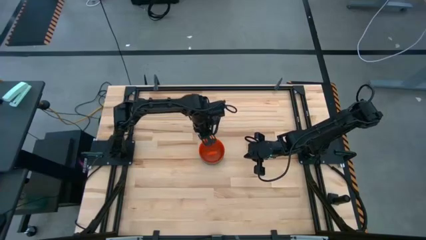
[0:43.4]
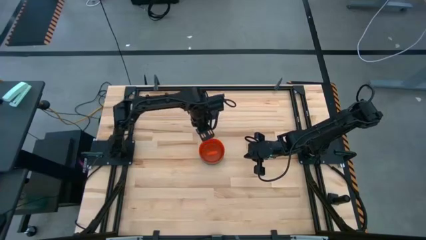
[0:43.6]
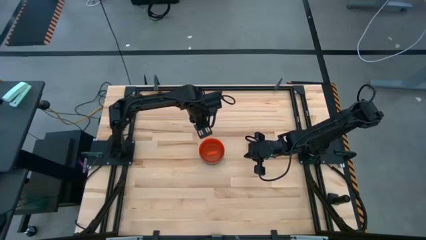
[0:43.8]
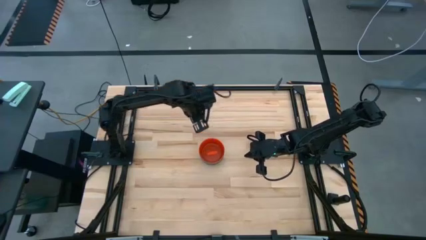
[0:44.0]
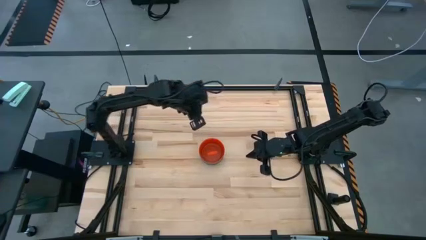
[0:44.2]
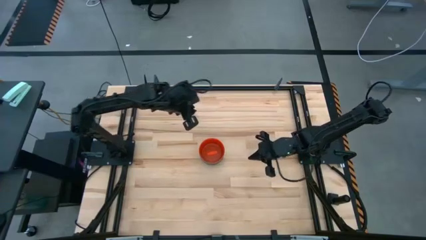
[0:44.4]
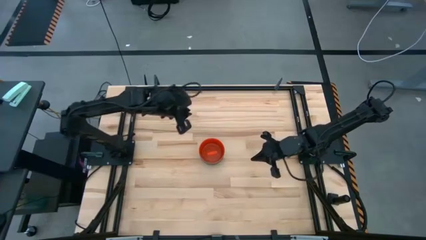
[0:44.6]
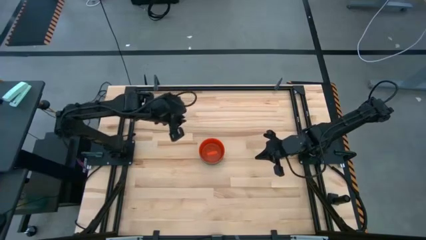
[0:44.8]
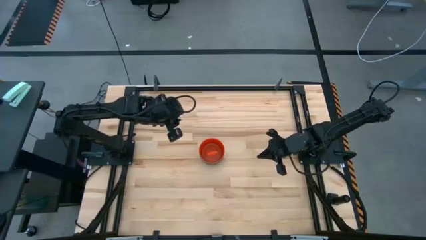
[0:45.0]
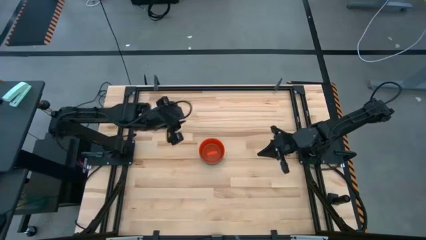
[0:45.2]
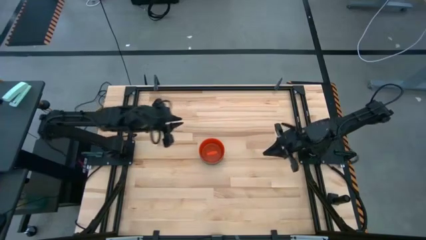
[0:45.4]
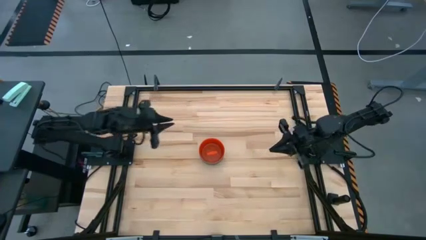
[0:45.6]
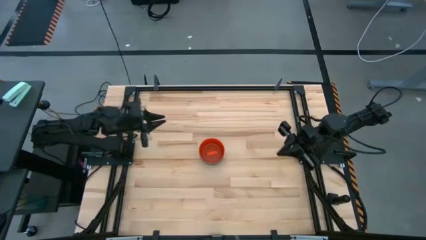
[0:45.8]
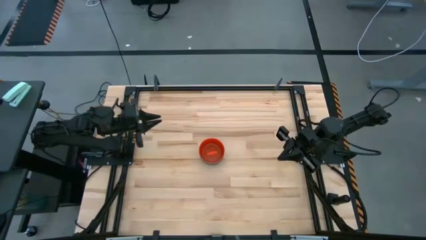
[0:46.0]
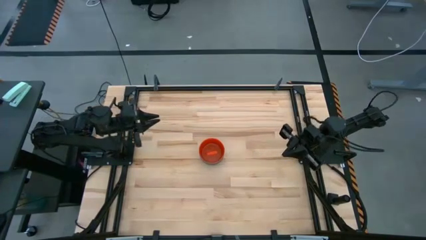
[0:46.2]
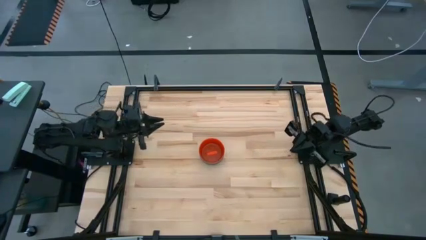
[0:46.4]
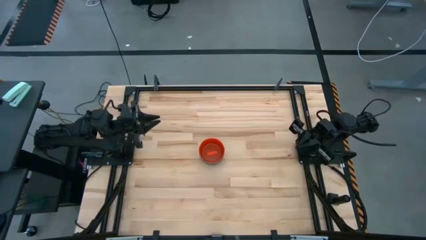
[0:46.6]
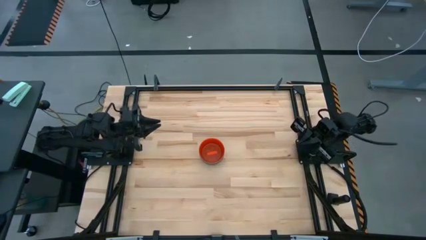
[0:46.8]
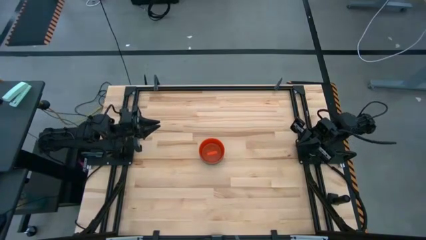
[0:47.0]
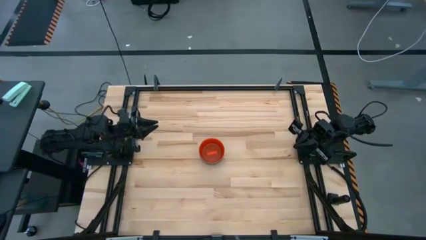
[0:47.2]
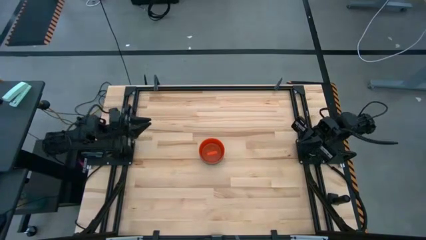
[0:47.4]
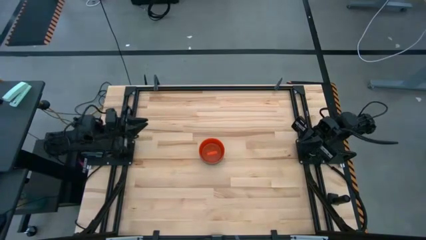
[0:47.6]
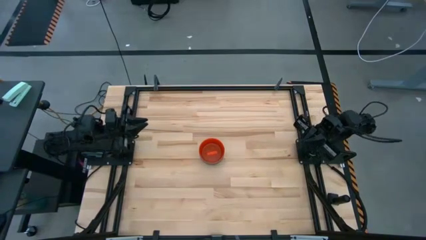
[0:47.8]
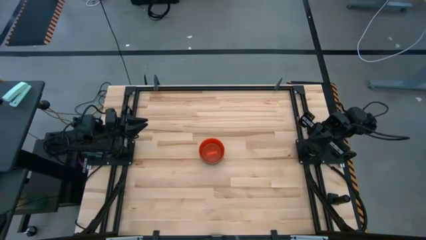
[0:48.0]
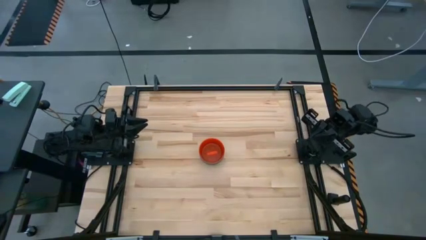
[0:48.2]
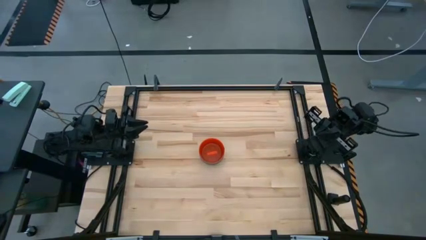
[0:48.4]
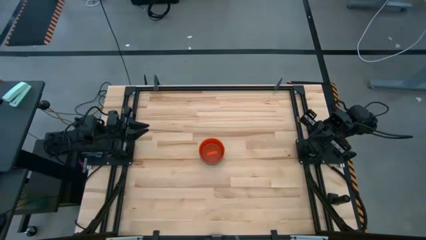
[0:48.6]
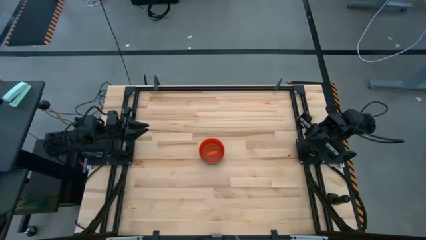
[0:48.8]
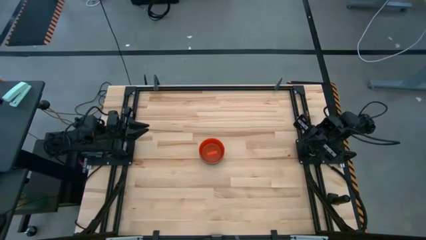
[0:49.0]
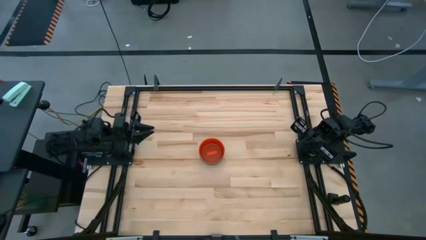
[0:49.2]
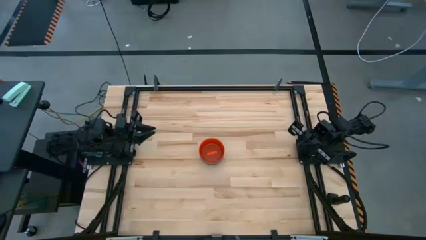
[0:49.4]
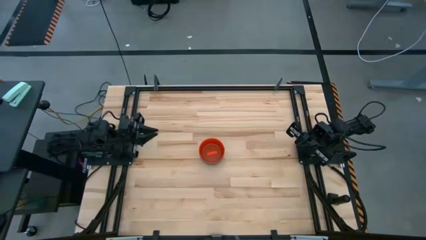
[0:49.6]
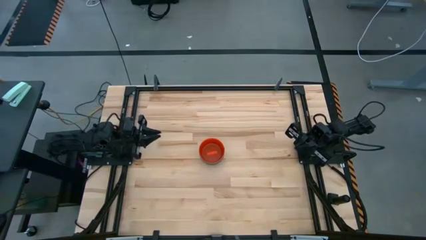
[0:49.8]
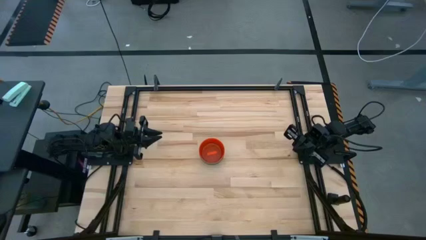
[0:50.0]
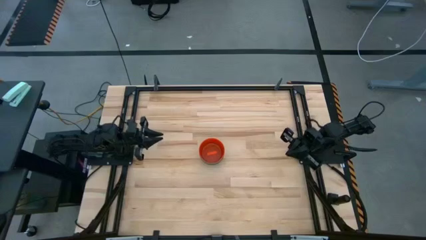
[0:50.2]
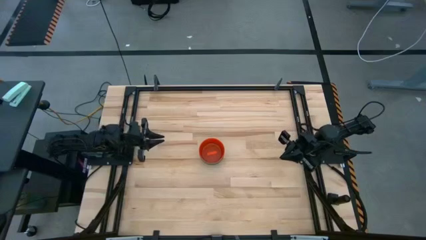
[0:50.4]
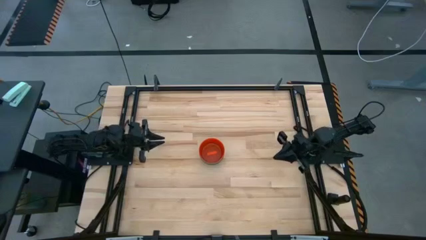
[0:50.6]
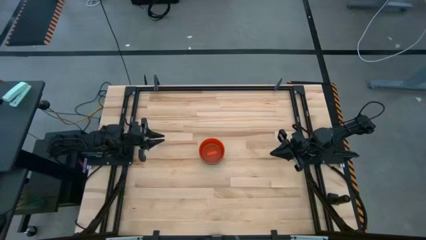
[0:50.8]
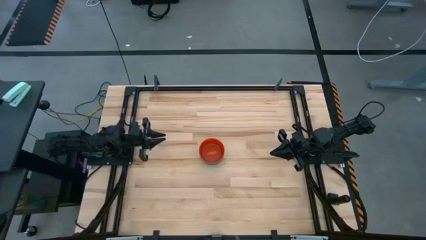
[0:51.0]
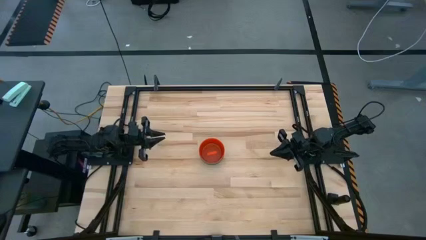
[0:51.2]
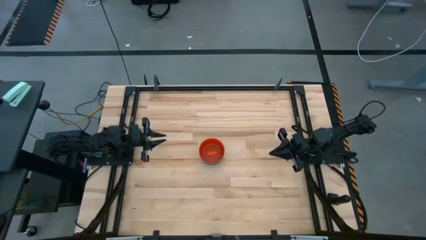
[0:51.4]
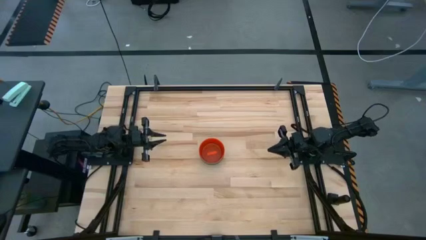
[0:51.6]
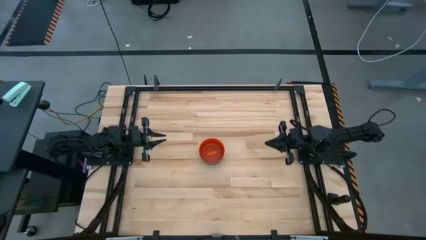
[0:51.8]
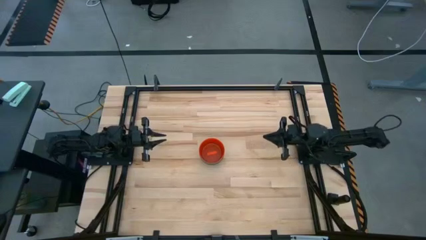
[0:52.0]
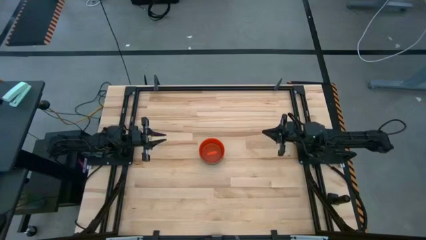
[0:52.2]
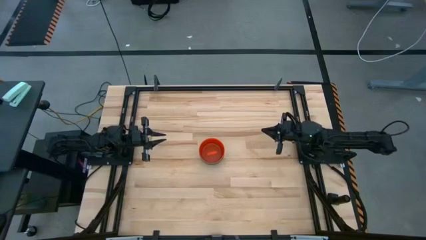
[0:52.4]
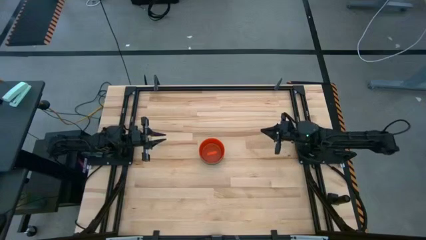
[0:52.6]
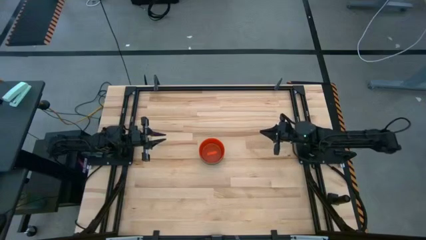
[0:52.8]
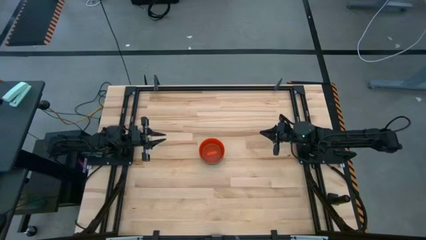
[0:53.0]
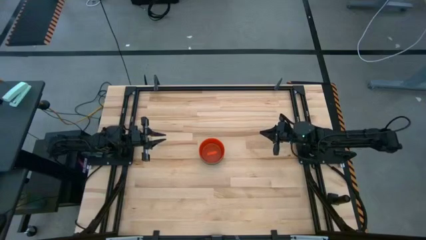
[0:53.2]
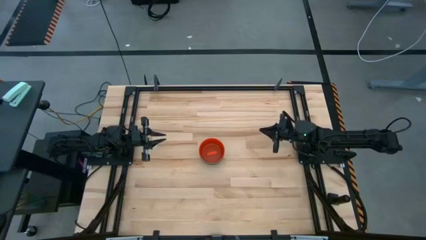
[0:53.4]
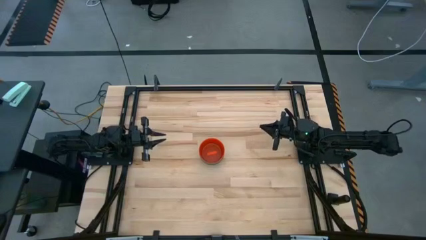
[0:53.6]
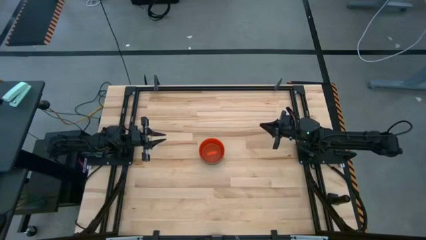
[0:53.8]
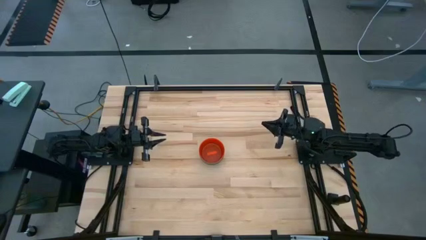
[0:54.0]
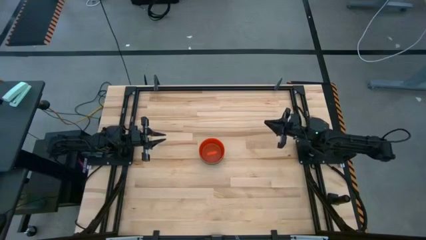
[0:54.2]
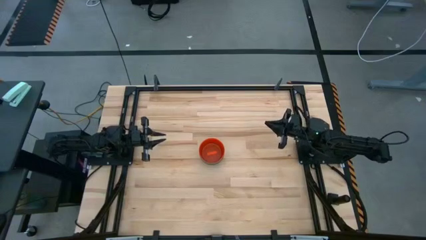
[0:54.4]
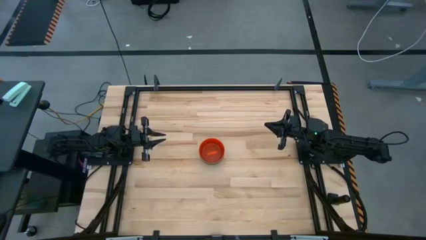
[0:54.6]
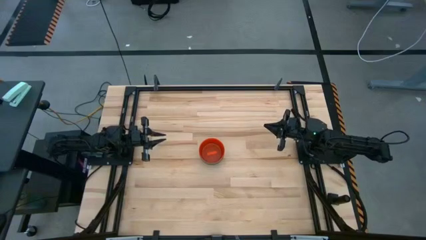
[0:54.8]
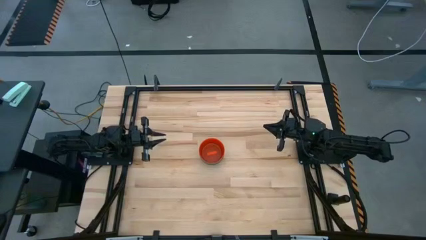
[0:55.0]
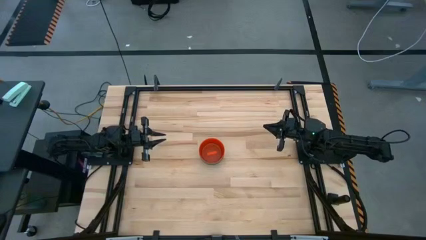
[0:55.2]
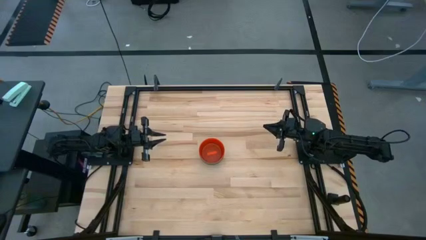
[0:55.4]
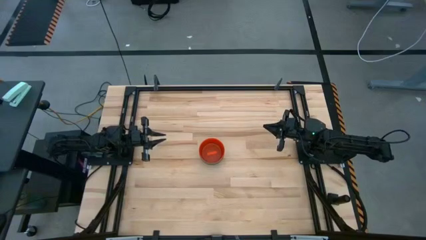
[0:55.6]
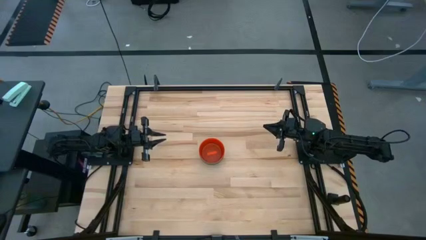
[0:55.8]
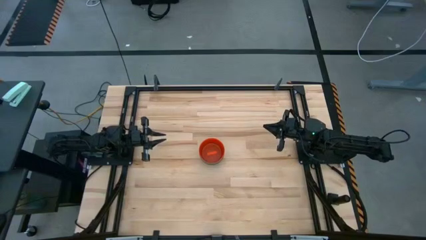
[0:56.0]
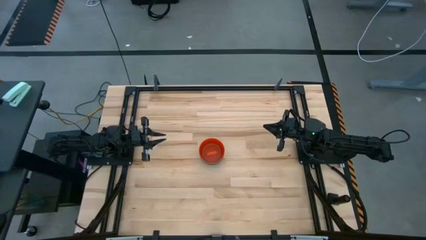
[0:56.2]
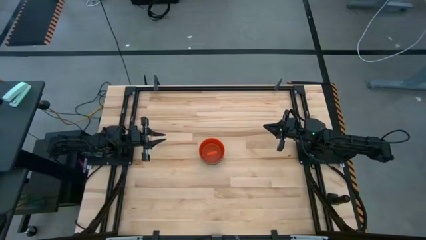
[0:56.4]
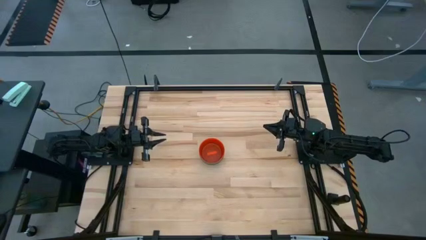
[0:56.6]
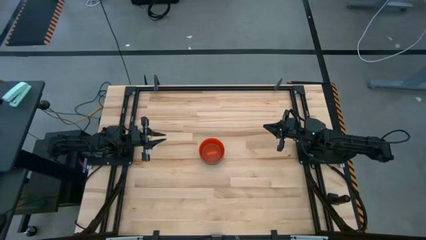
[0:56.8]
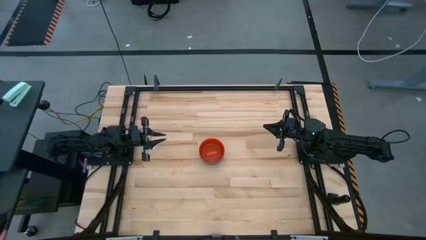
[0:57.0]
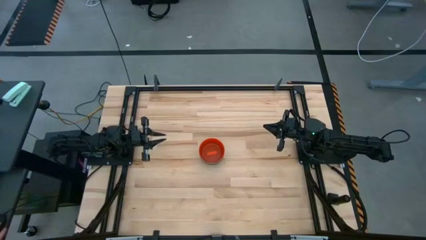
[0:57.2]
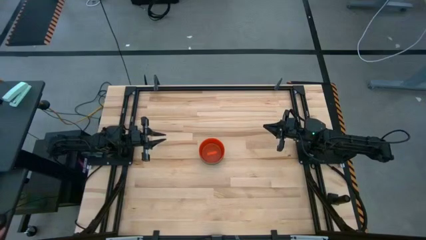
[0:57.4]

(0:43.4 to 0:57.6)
Task: Nest bowls inside each other
Return to Home Position

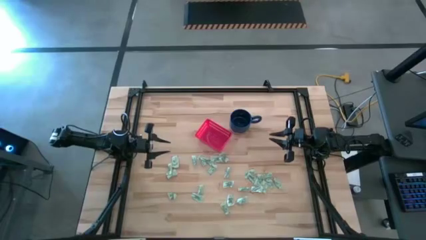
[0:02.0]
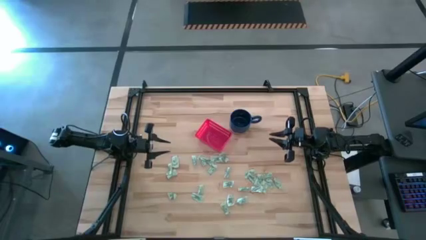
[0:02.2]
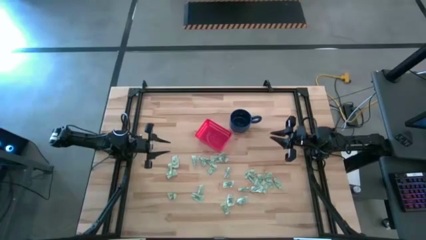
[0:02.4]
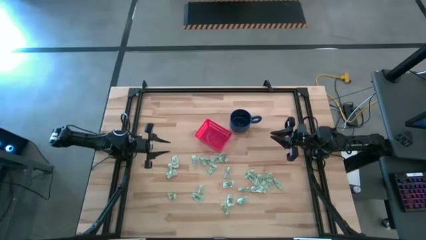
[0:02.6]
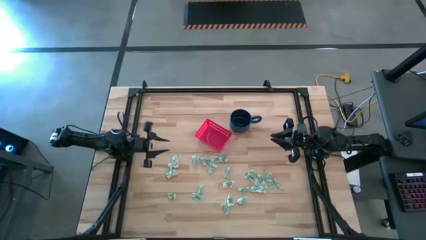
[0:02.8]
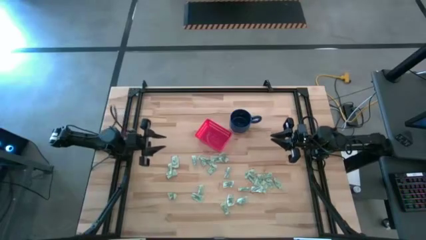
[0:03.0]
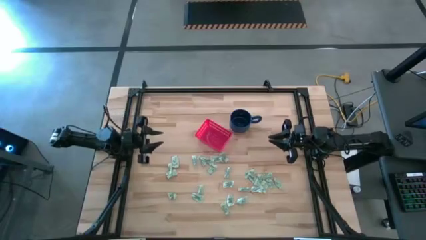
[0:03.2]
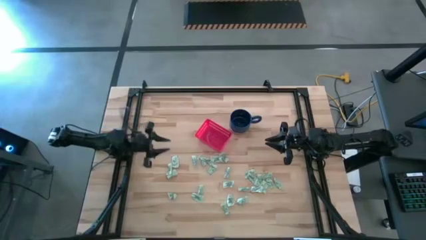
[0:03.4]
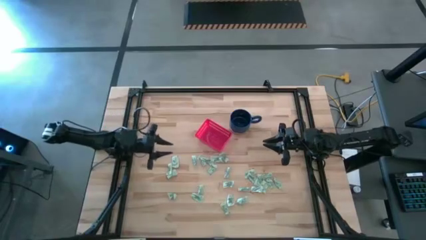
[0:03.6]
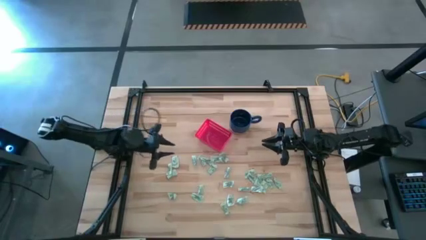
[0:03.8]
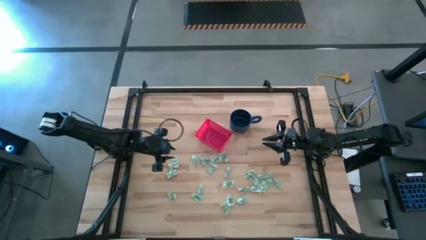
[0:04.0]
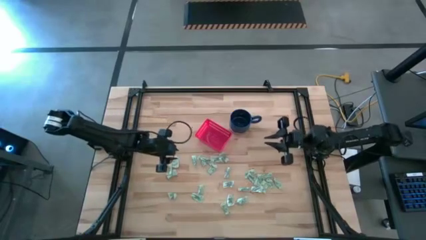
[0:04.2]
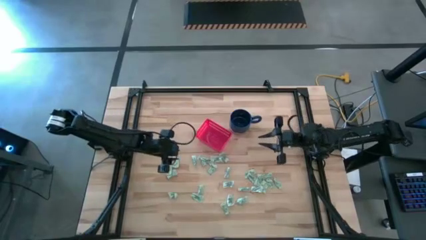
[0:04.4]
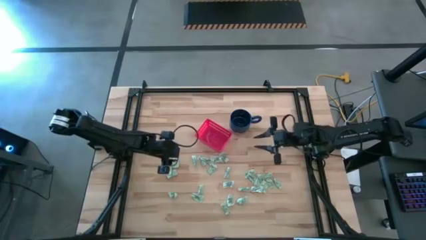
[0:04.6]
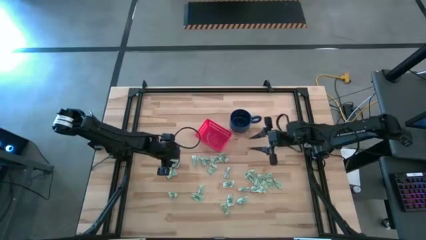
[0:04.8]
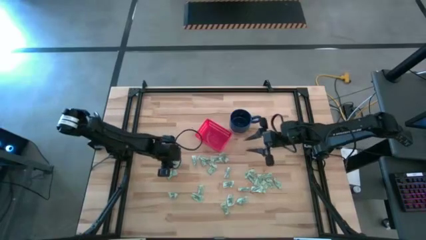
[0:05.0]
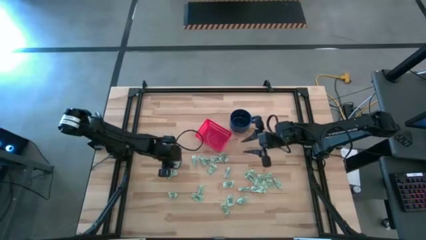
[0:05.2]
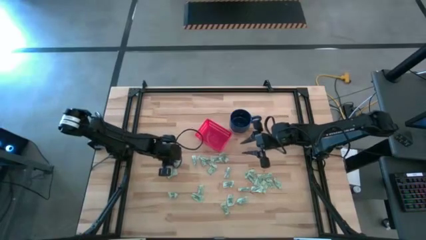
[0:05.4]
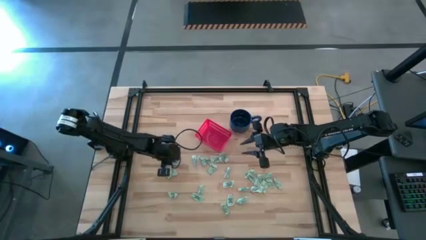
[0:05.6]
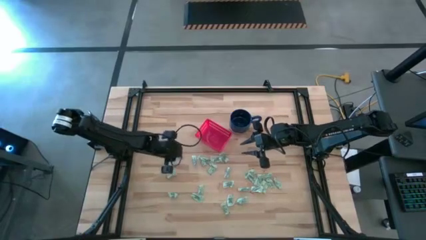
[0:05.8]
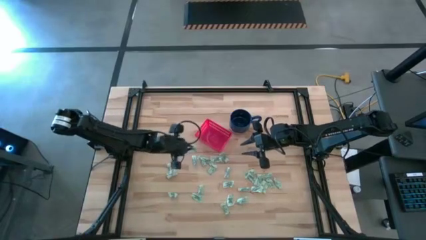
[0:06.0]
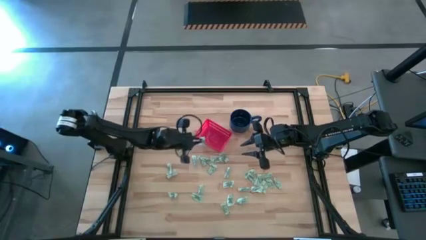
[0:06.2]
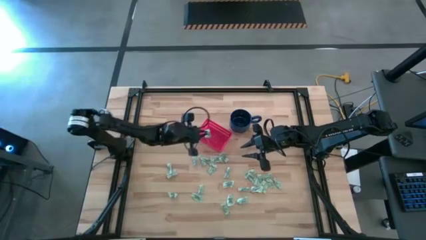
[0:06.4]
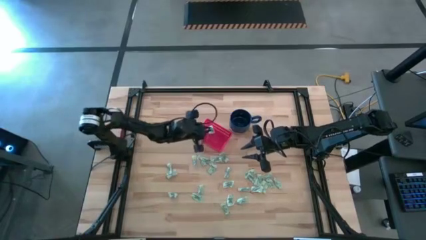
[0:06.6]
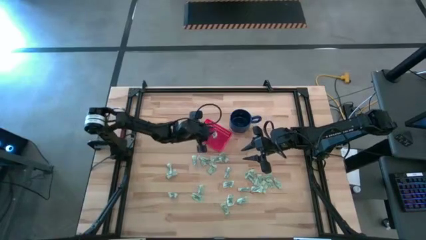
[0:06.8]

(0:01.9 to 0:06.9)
Task: Pick and place items into bin
Put the stevia packet into the bin
